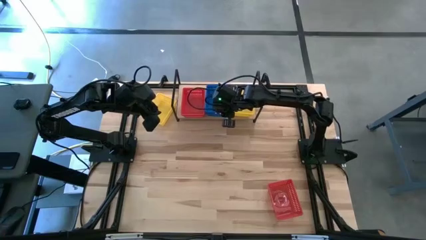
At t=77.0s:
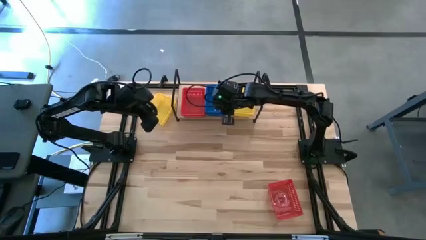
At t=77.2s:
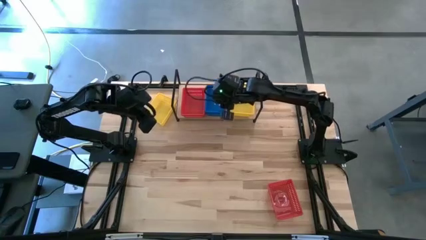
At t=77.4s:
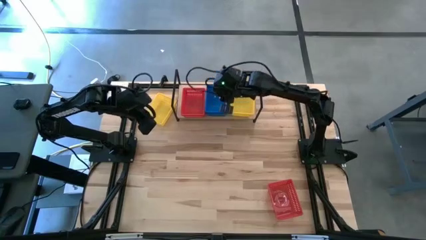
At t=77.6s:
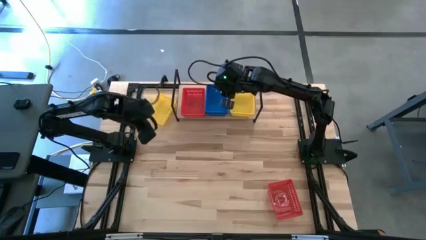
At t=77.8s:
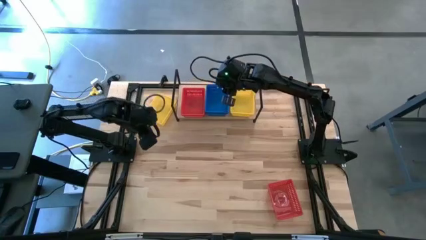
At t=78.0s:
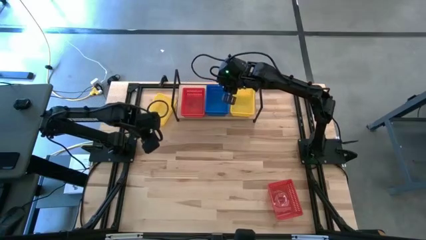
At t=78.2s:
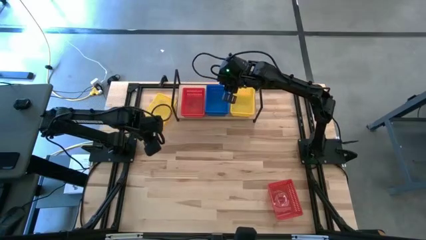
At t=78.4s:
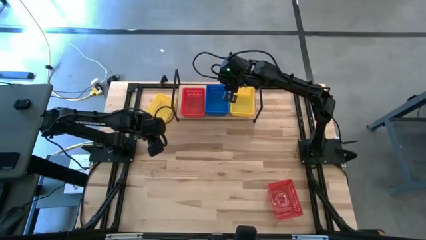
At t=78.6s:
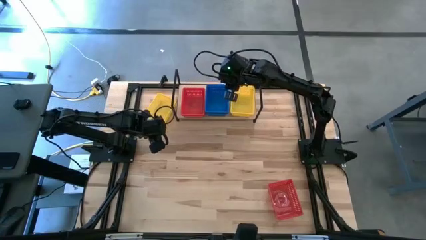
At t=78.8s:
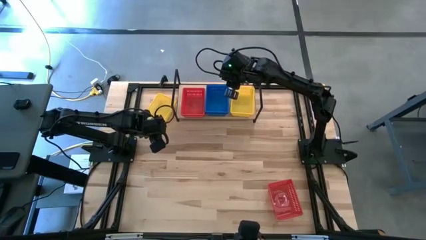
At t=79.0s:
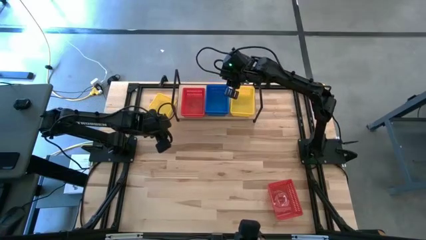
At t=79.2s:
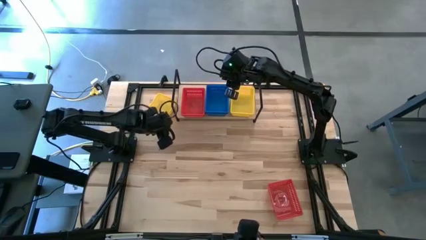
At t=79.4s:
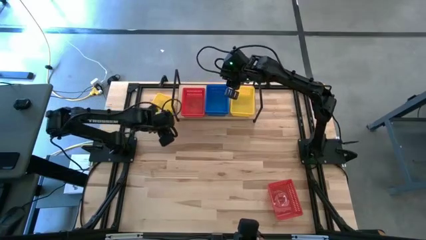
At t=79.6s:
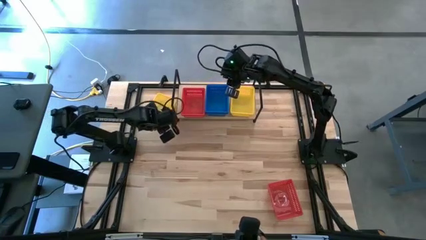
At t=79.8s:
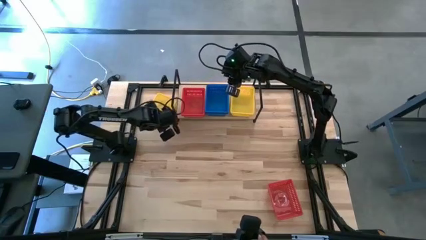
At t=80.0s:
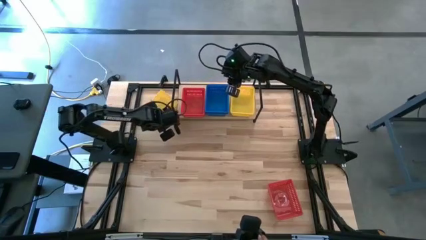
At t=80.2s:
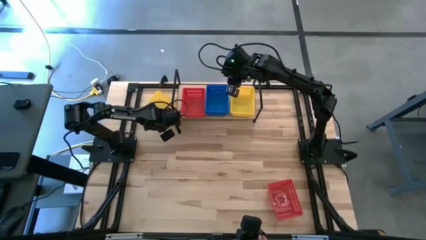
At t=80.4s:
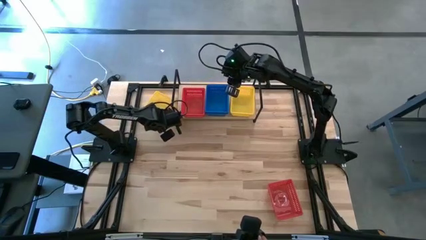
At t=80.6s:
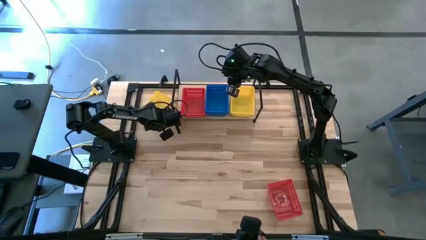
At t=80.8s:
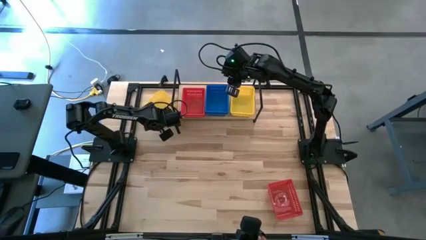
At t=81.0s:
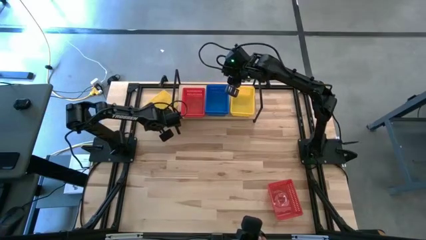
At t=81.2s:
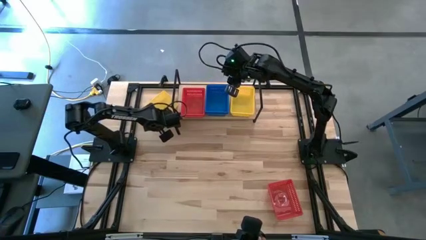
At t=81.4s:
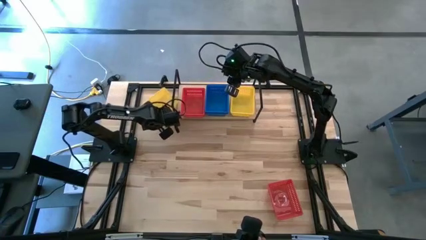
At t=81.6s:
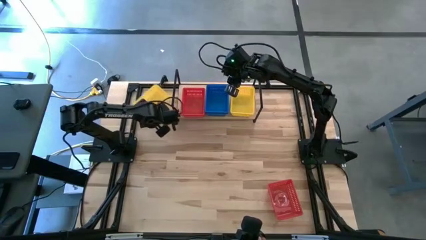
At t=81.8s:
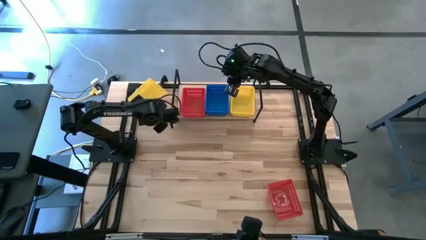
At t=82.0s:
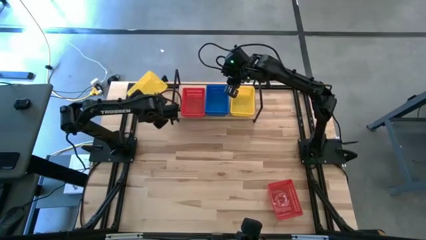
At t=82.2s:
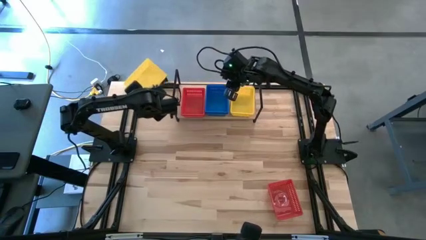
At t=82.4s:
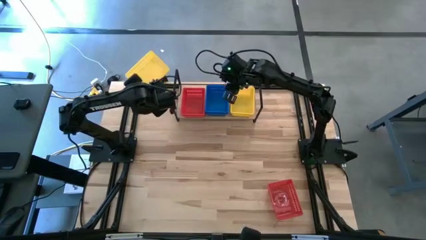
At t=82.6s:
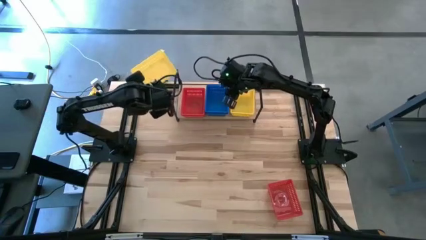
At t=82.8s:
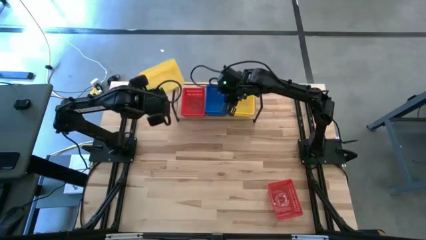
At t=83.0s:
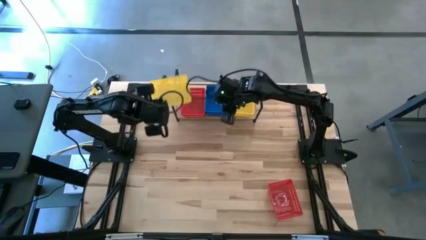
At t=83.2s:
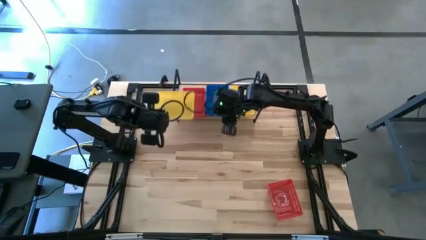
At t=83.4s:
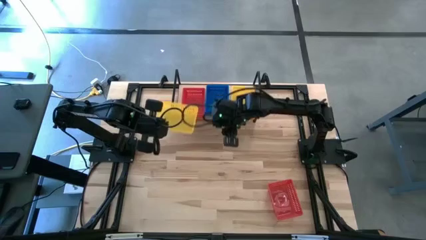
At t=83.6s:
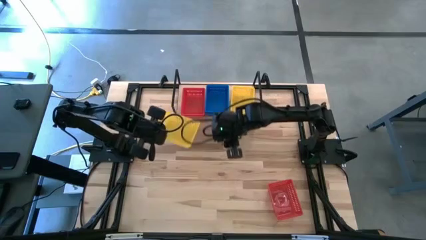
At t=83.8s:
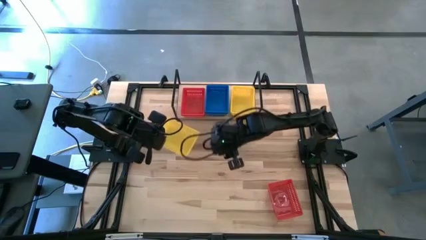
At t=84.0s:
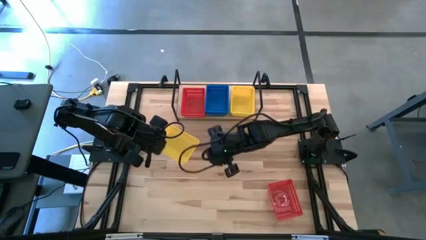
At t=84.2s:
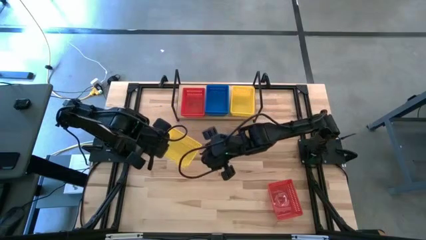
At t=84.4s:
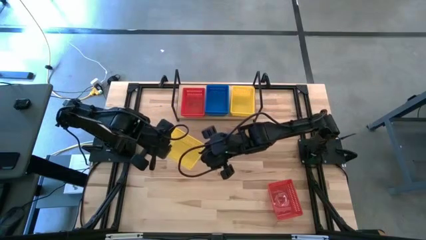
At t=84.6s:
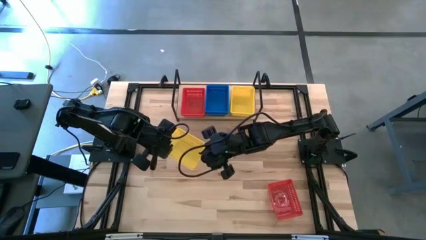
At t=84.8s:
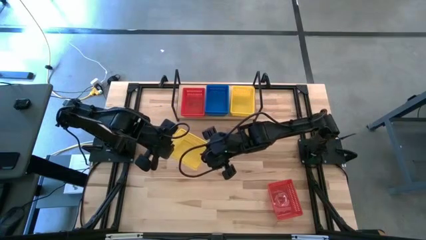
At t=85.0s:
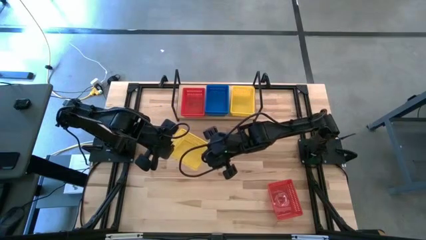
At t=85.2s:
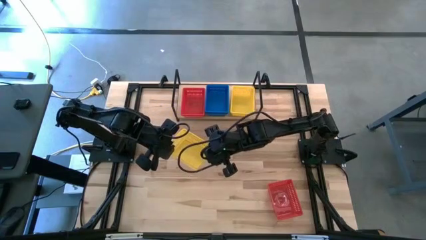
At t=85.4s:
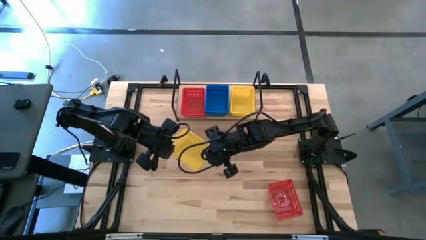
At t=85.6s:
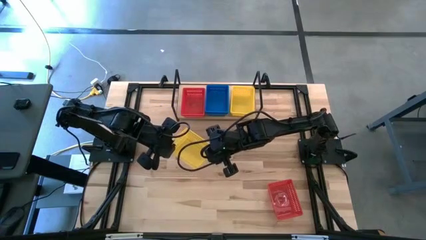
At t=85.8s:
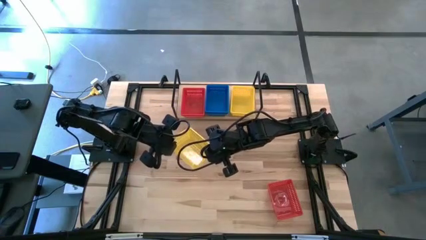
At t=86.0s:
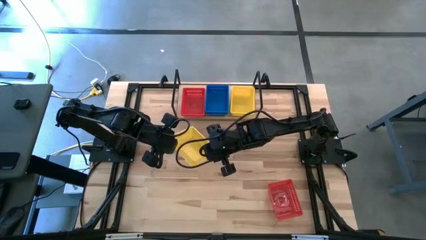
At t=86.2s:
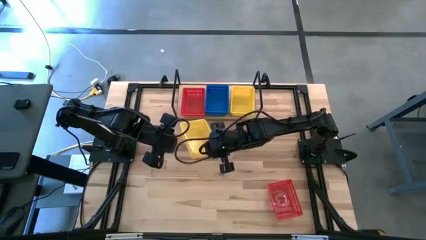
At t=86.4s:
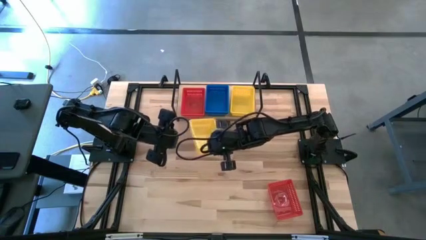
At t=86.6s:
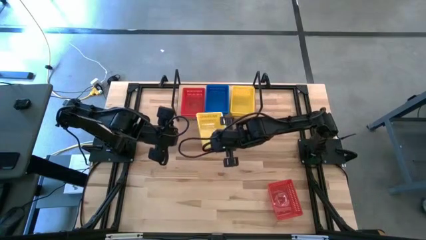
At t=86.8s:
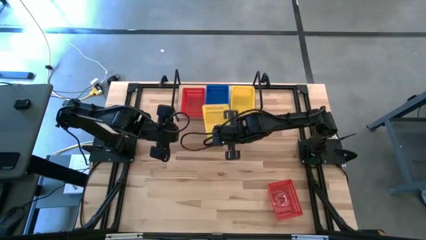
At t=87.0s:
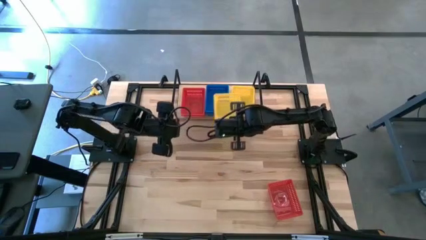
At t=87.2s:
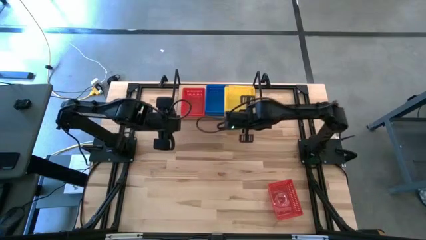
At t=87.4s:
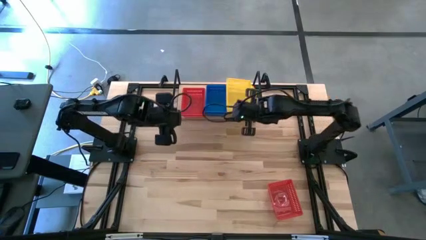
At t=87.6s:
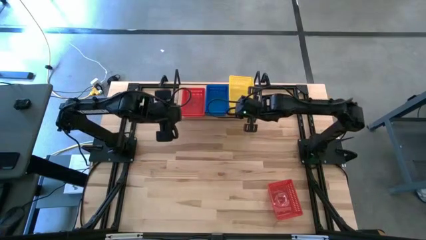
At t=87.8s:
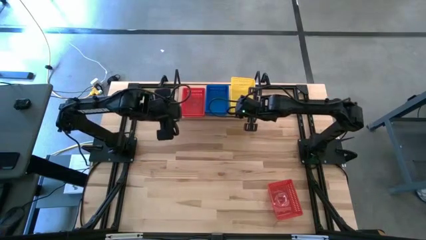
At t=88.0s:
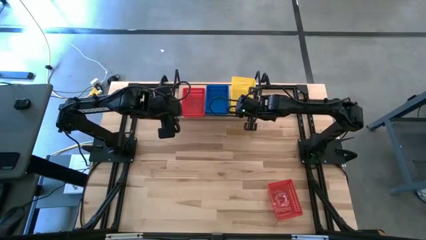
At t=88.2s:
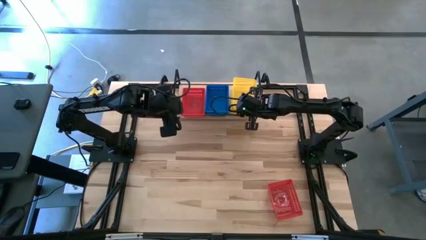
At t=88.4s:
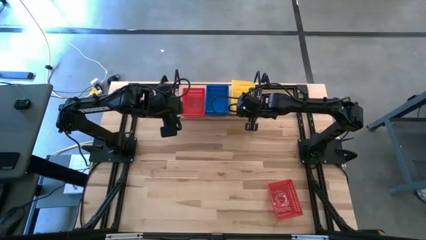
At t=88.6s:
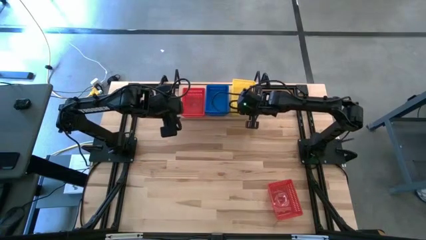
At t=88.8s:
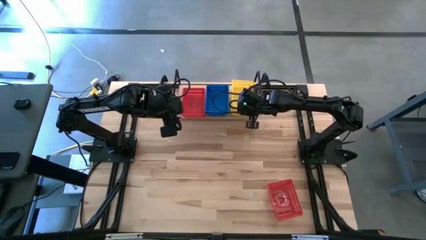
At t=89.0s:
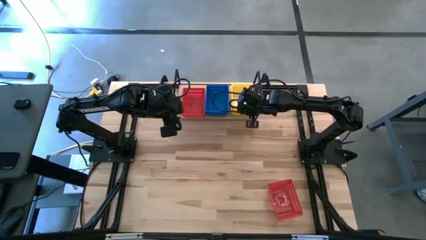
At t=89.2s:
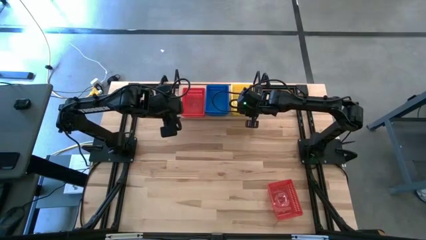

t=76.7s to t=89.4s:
Task: Stack baskets on shelf by color
Stack the yellow bin on top of the yellow bin on the shelf
